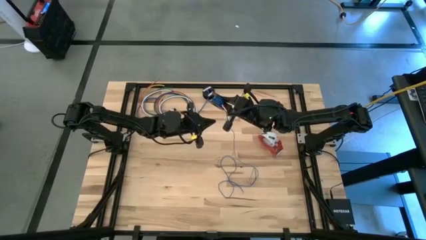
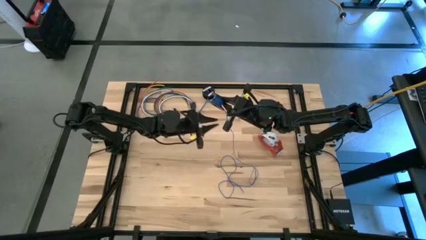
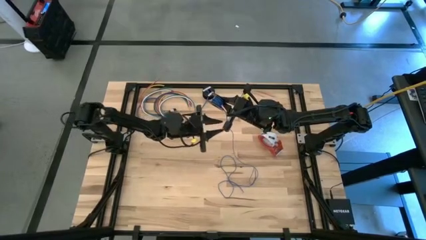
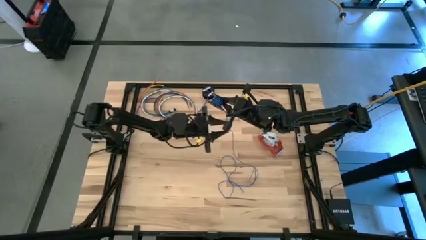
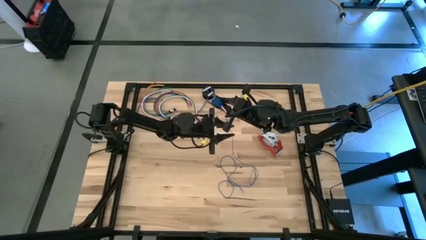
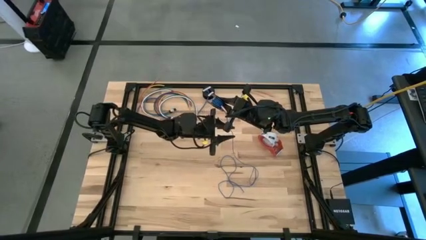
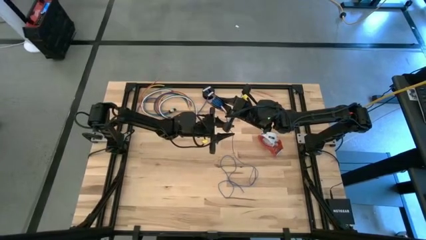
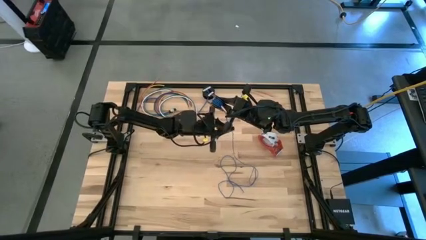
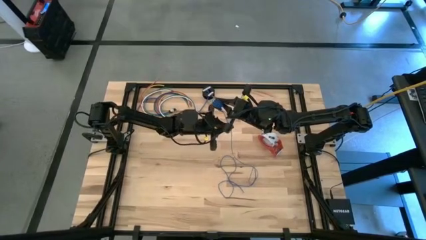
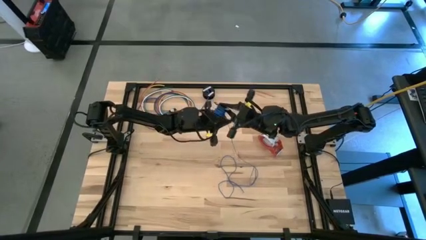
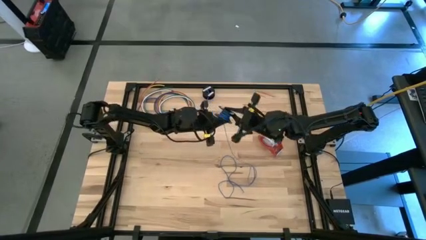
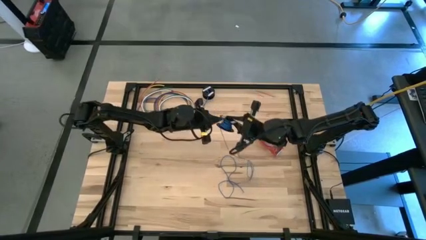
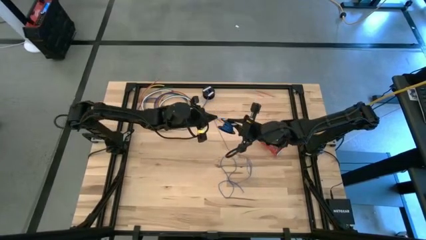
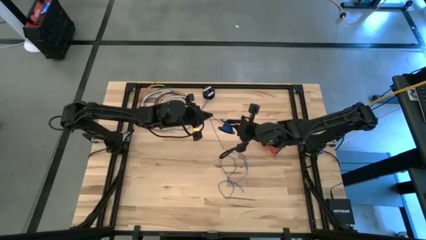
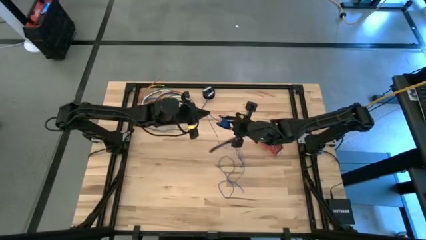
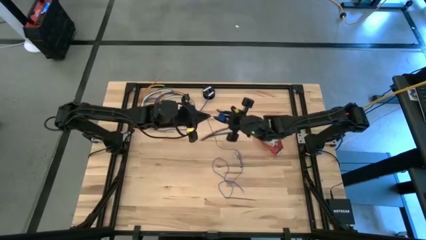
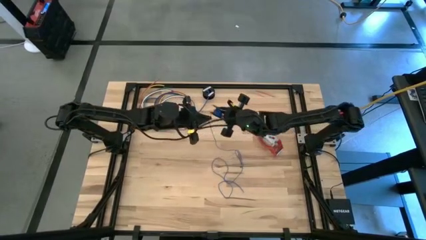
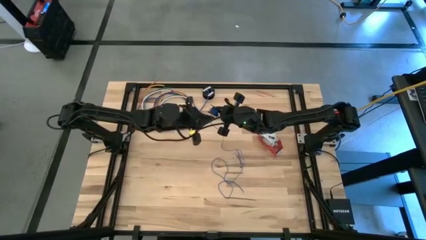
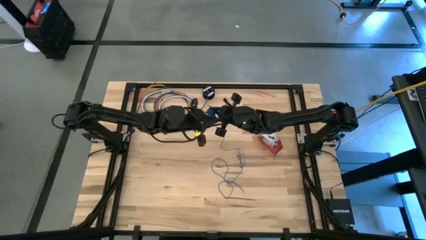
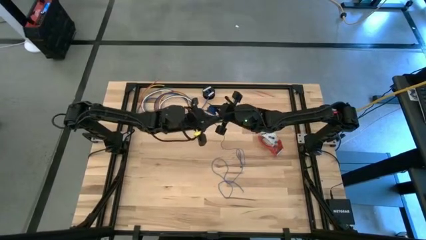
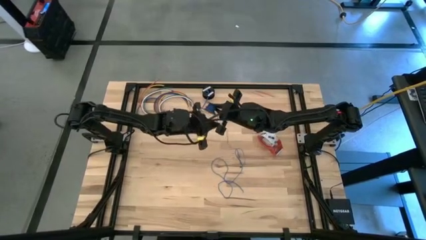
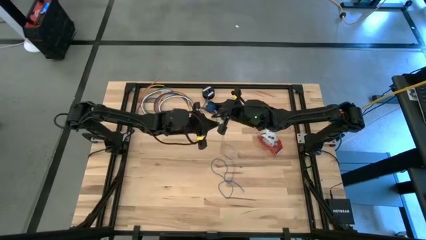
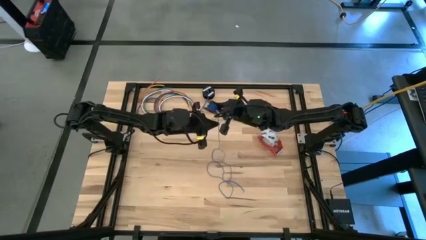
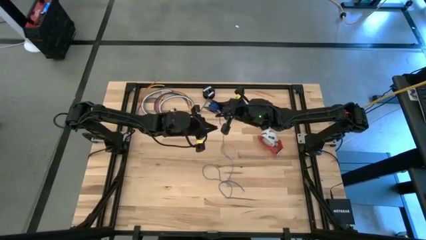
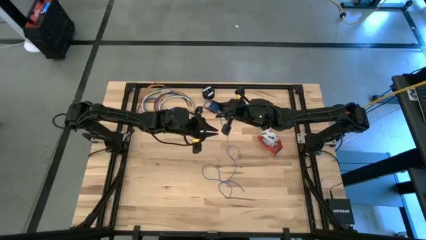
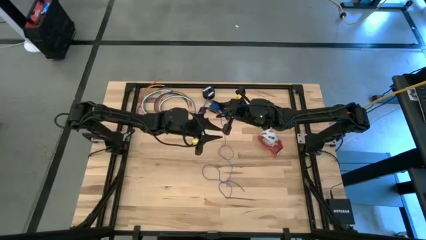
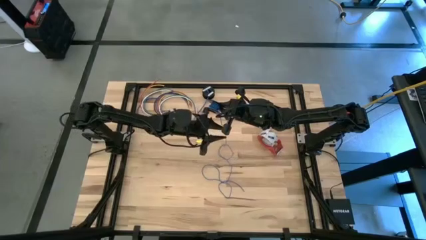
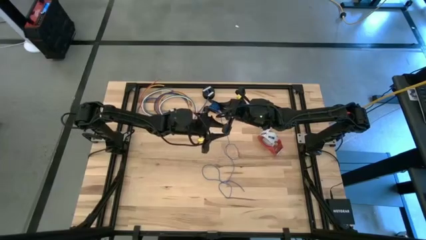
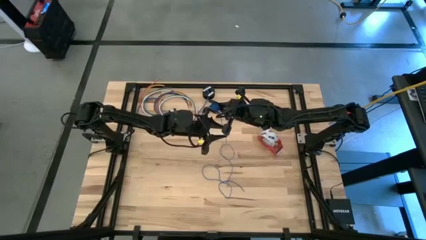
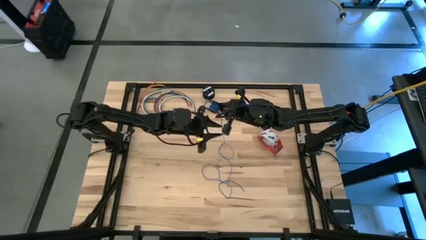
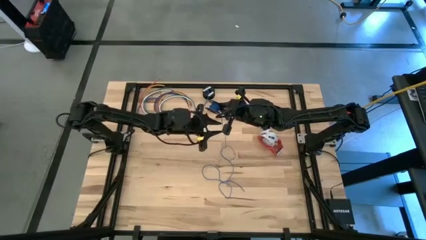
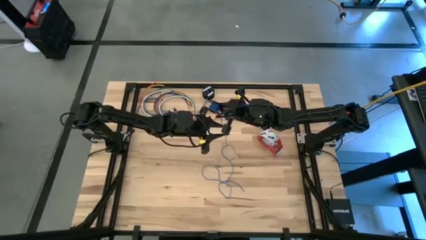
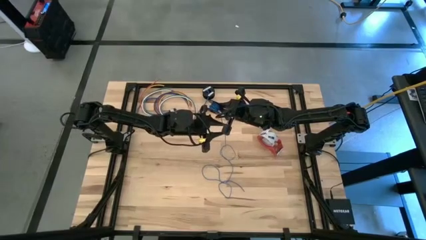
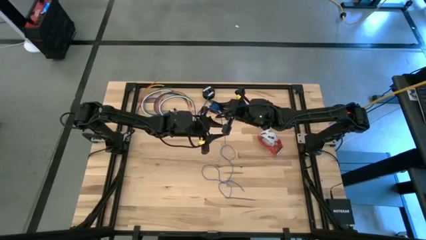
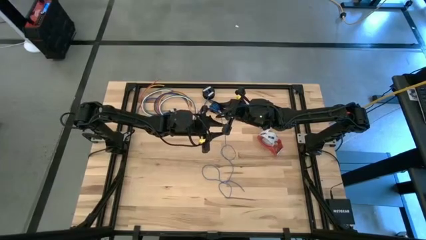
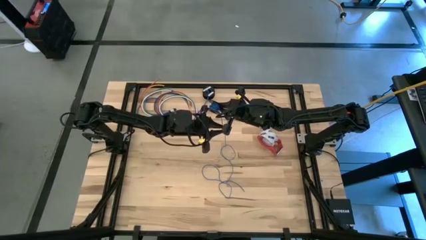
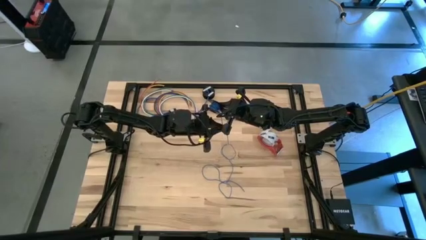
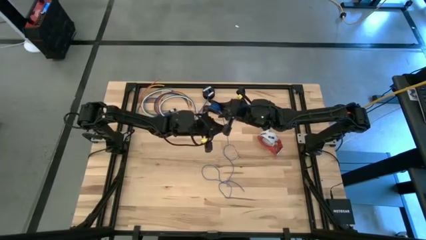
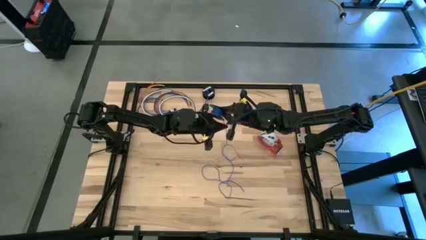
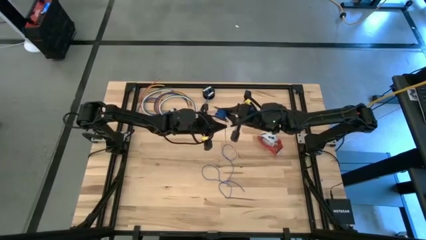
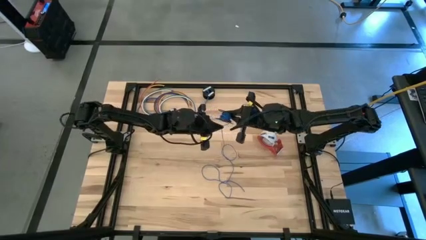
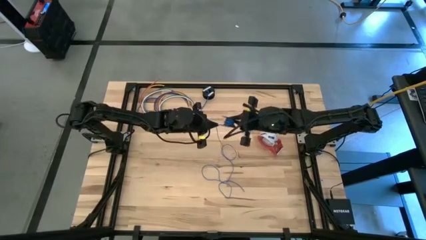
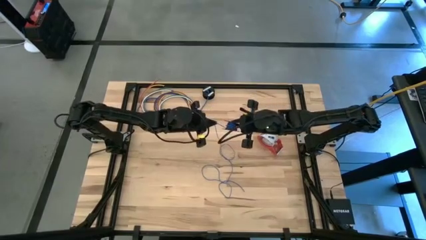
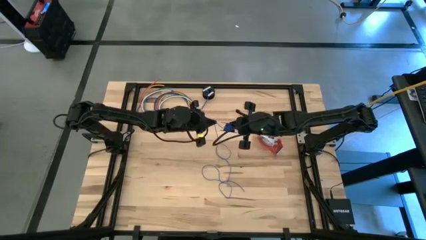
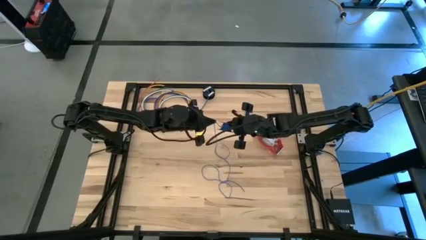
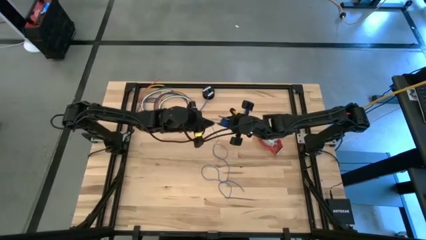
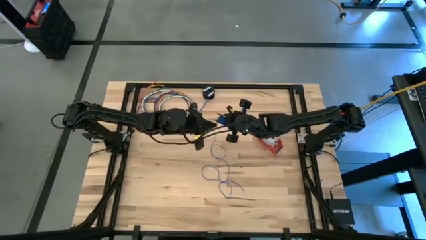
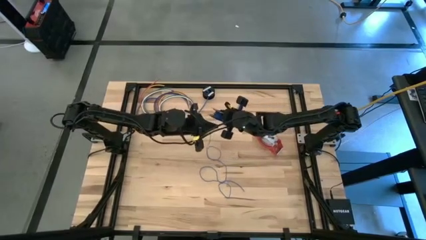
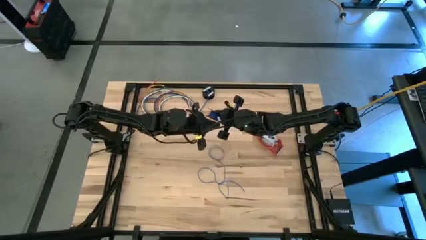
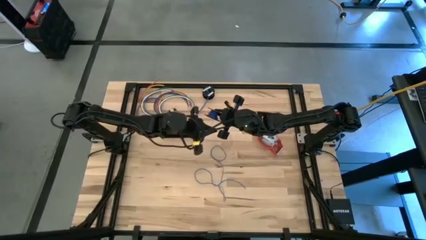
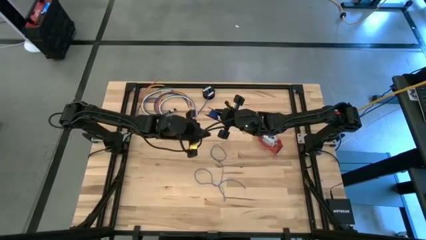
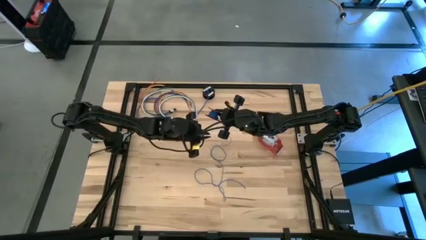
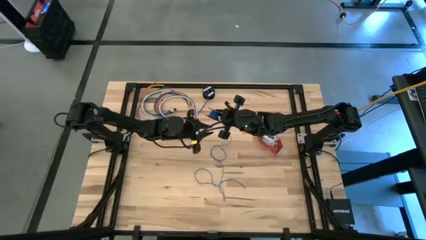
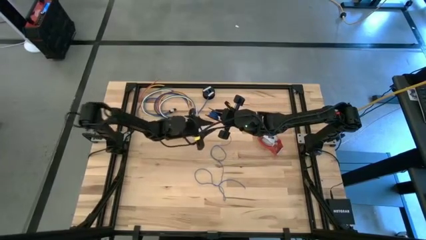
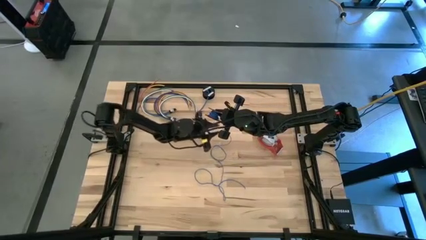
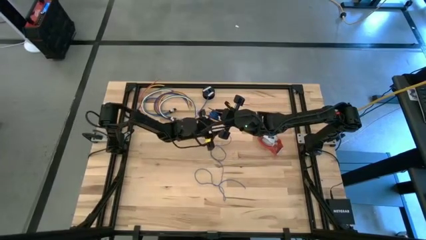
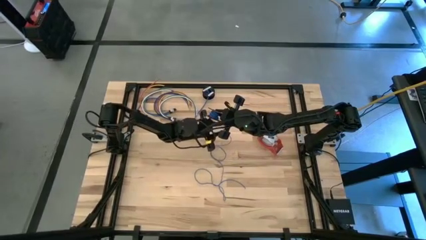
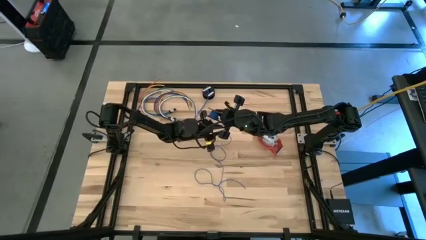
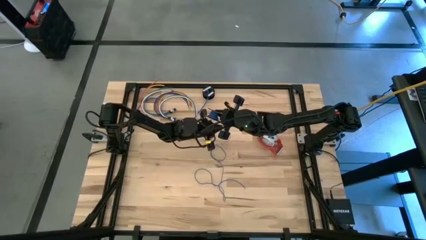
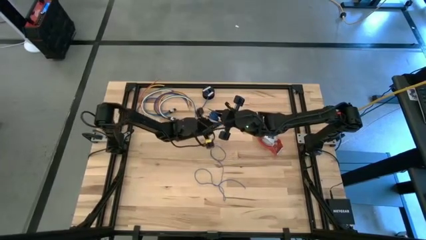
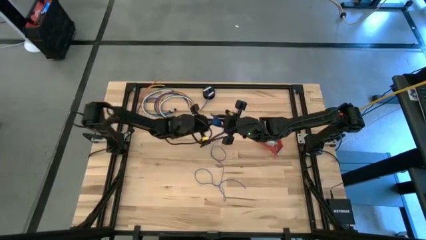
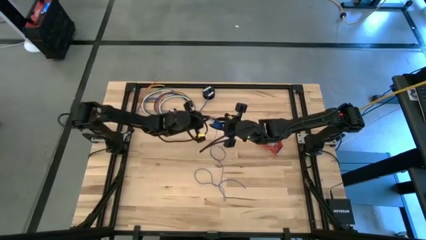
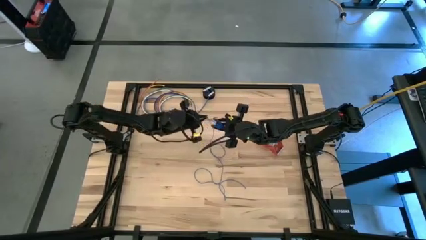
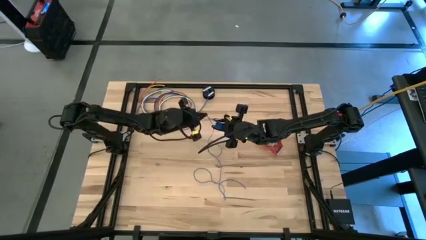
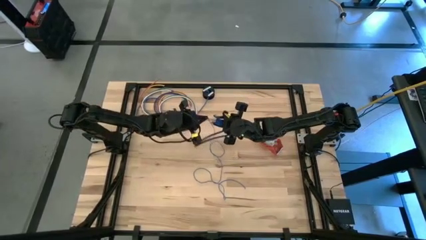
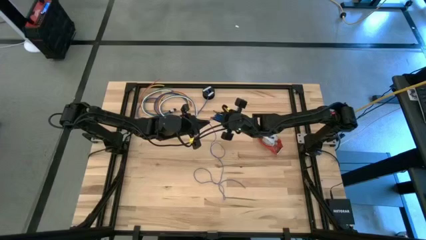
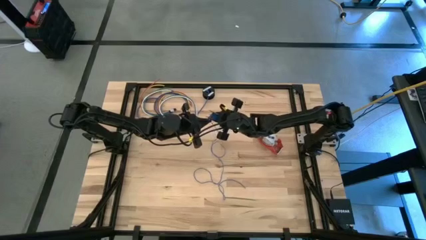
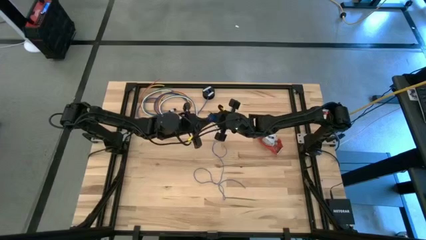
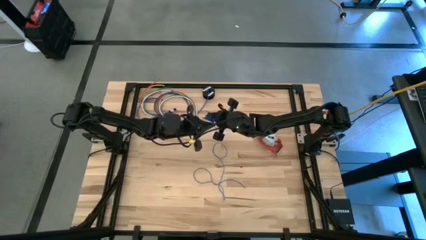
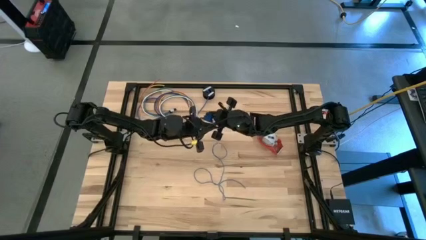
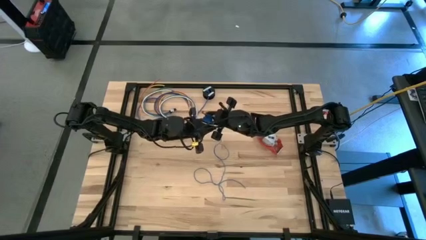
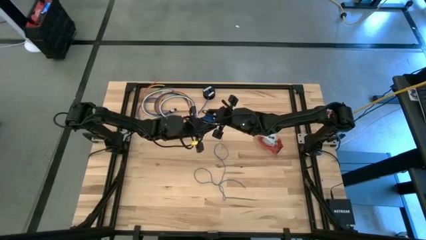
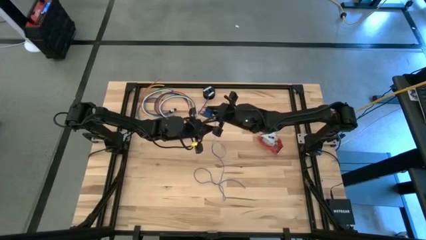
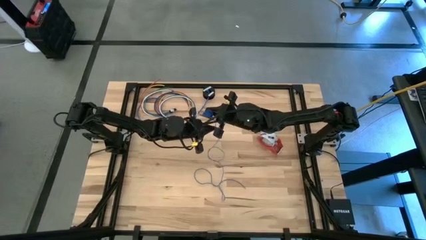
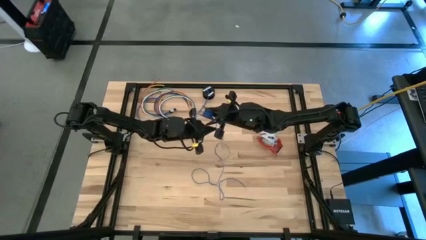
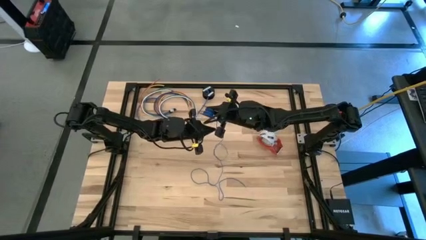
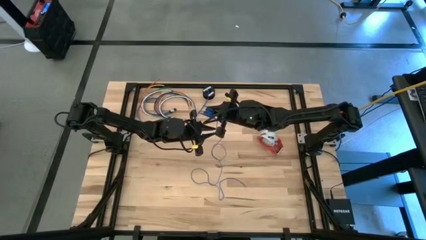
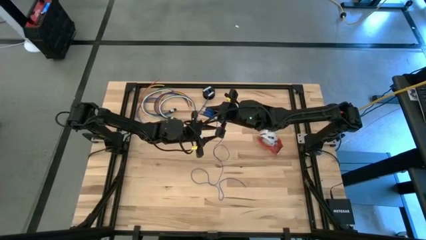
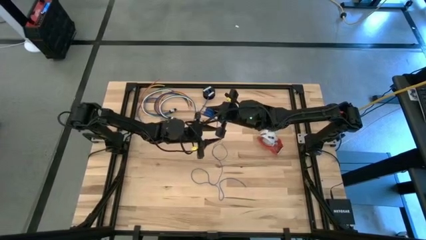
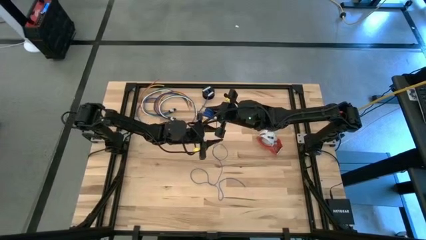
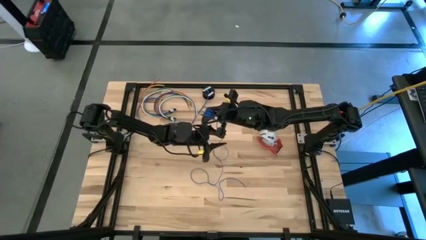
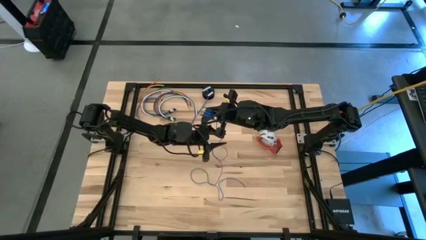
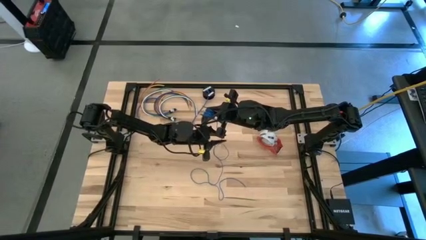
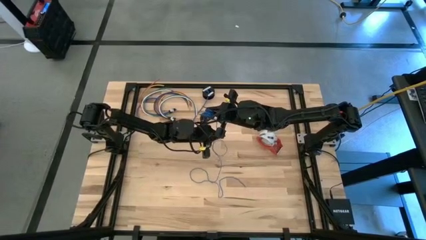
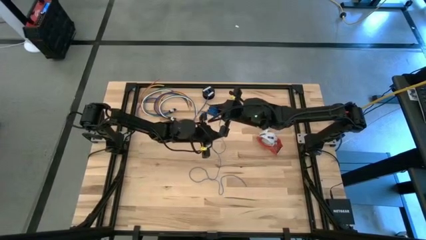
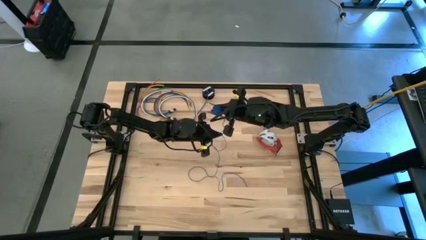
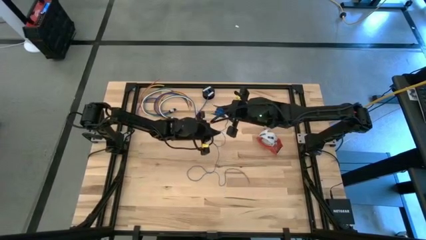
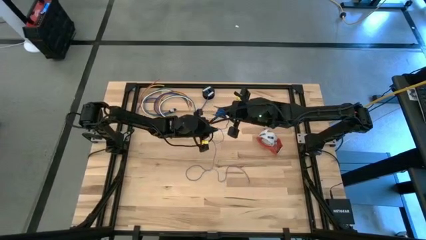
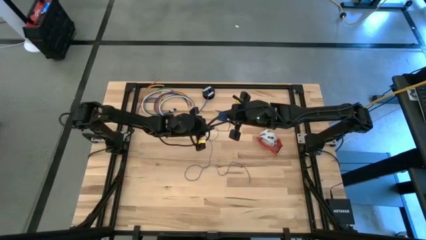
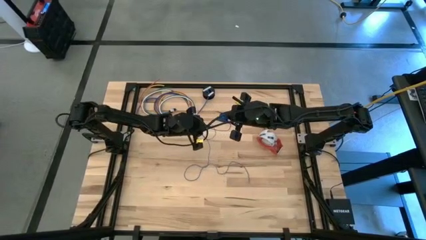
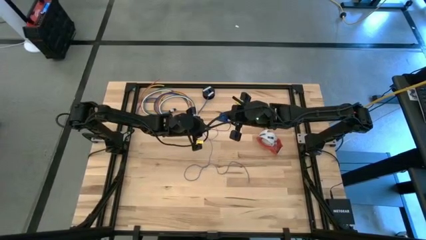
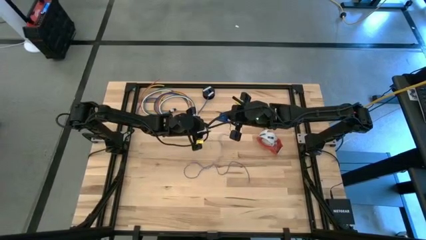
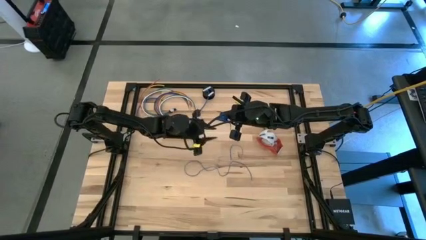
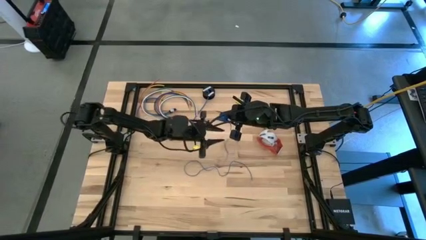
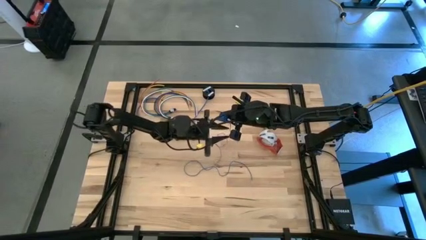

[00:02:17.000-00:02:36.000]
Task: Coil cords
Coil the blue wire onto the spool
